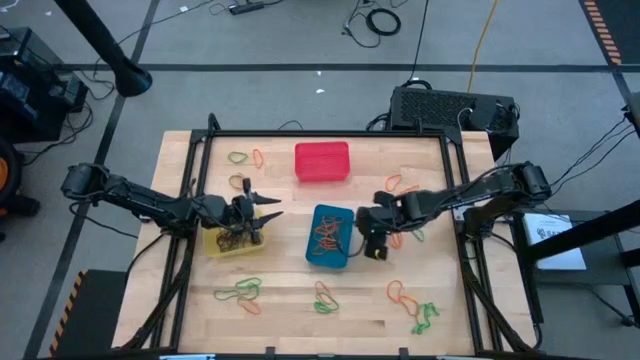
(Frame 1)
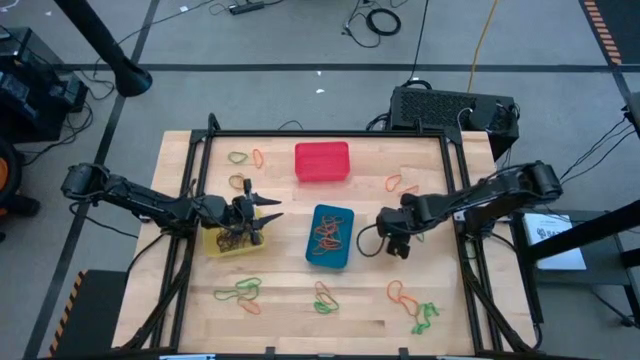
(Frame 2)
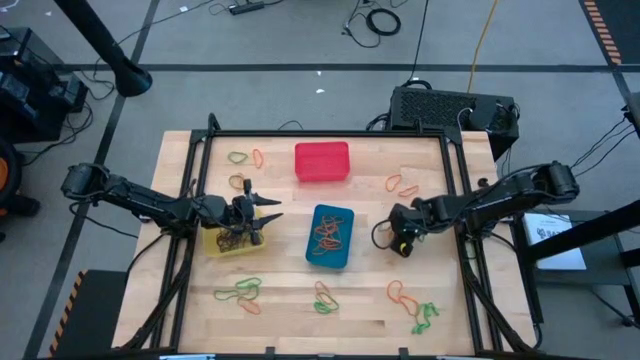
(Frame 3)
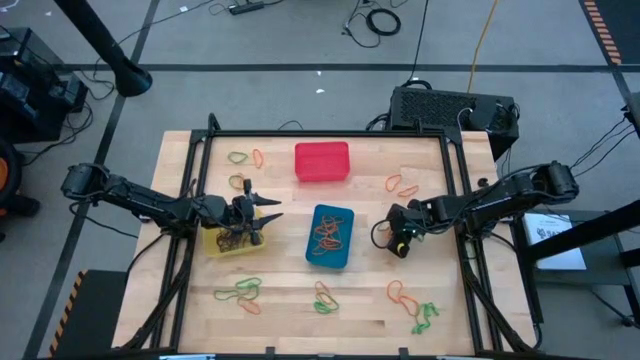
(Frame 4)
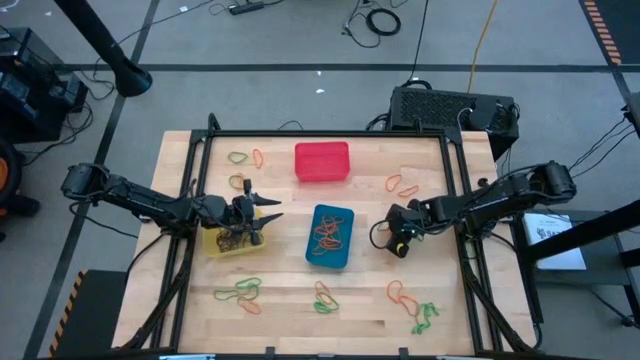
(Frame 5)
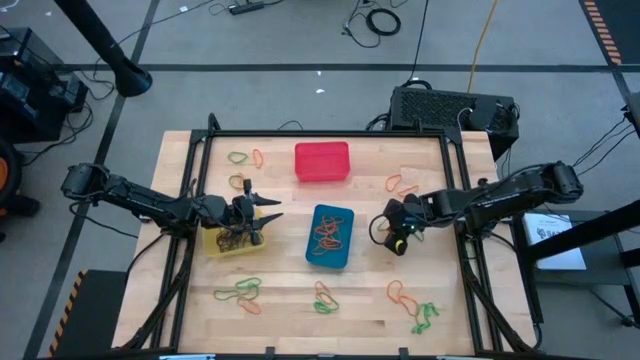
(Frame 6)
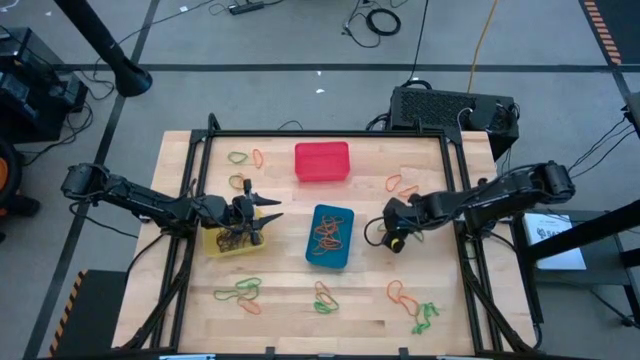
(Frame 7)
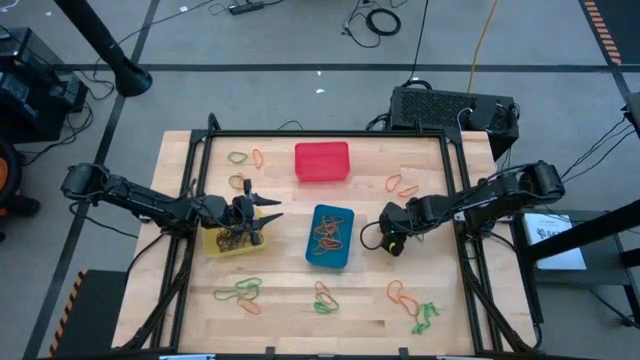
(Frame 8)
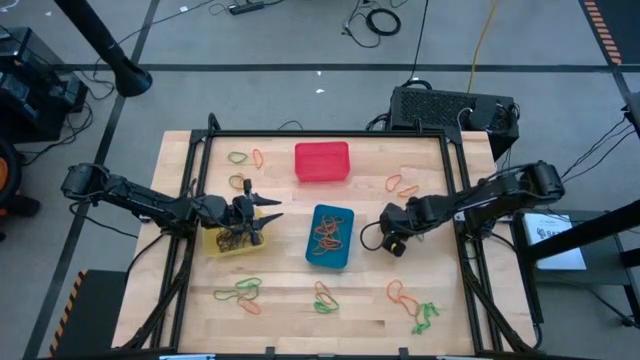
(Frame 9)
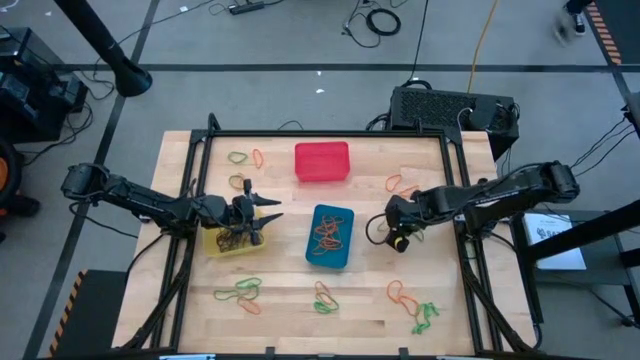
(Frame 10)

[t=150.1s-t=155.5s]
Task: Sort rubber bands into baskets
Put the orange rubber band into the blue bin

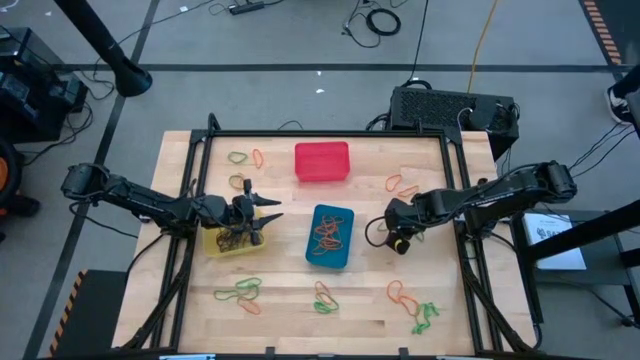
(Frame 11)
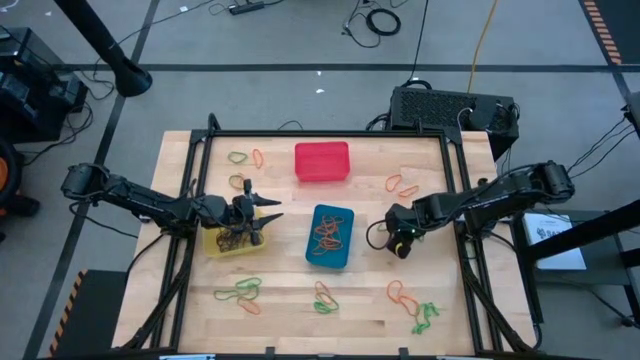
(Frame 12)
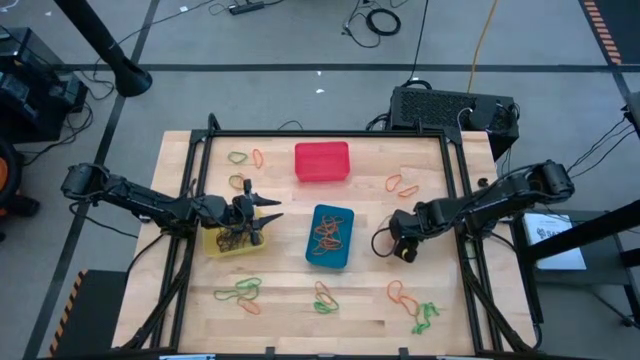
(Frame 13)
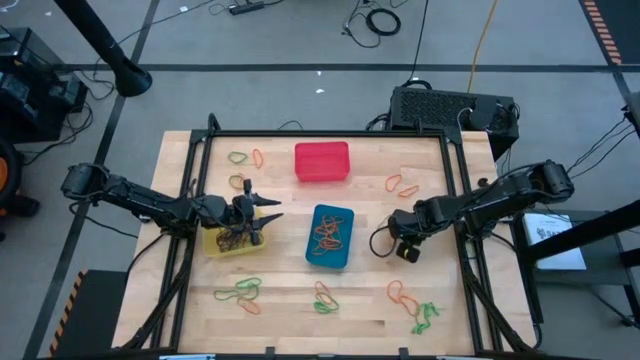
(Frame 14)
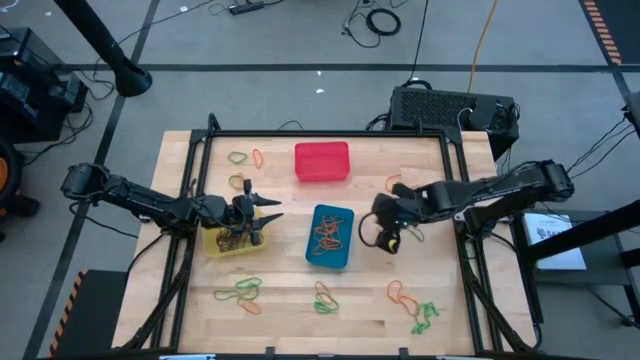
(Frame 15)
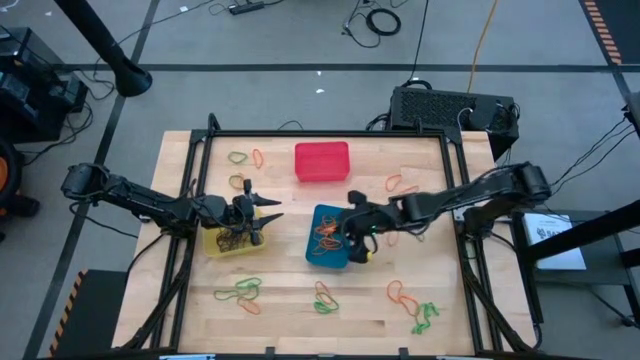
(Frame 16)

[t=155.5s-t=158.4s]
Put the orange rubber band into the blue bin

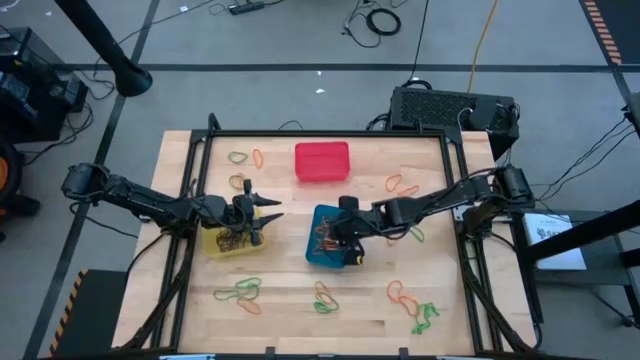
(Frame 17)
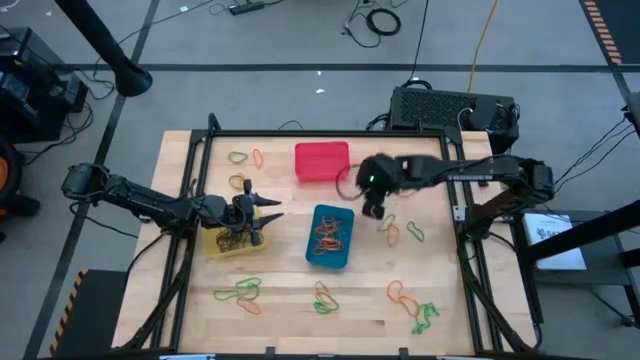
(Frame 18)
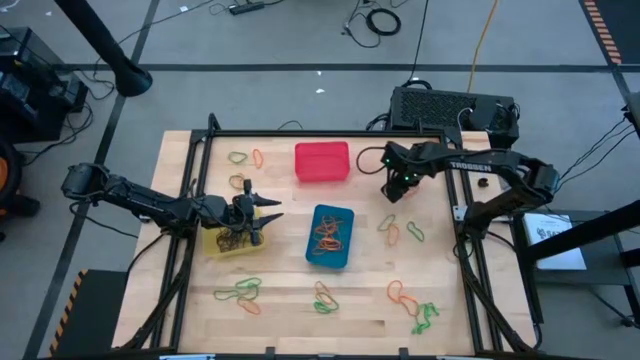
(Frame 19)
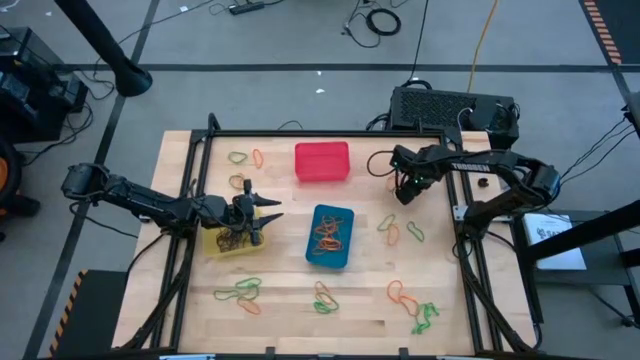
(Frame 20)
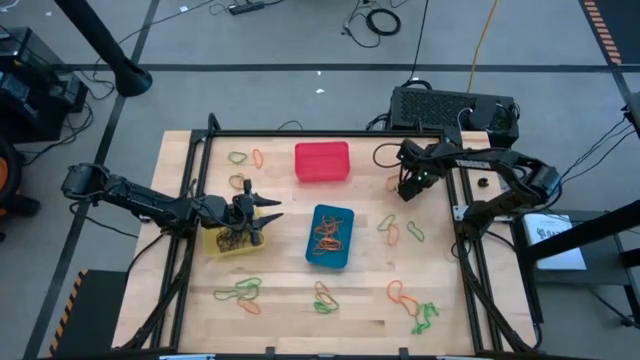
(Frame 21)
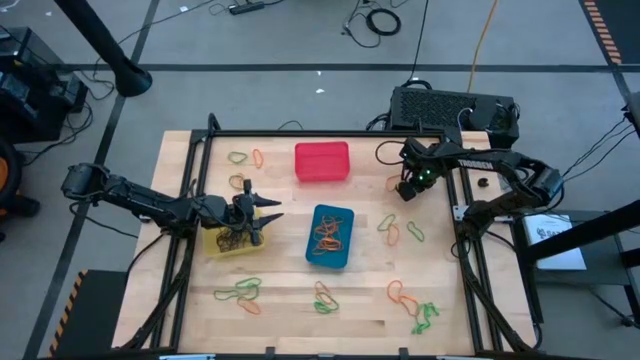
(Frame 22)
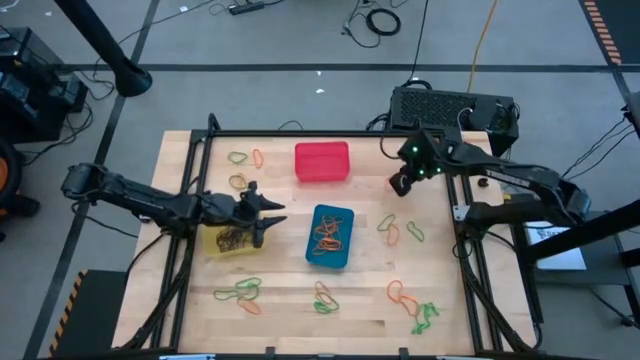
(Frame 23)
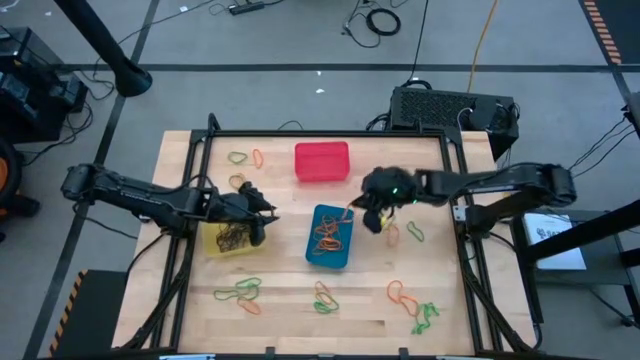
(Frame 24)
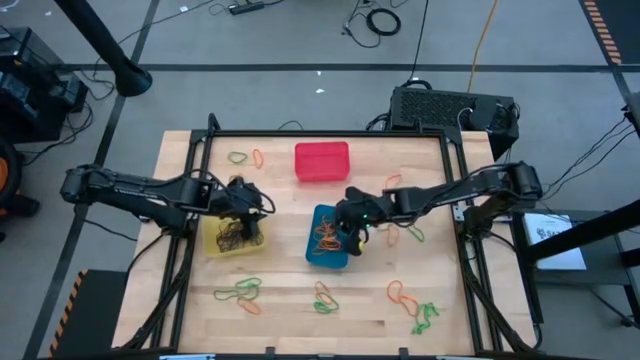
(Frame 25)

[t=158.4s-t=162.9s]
Put the orange rubber band into the blue bin

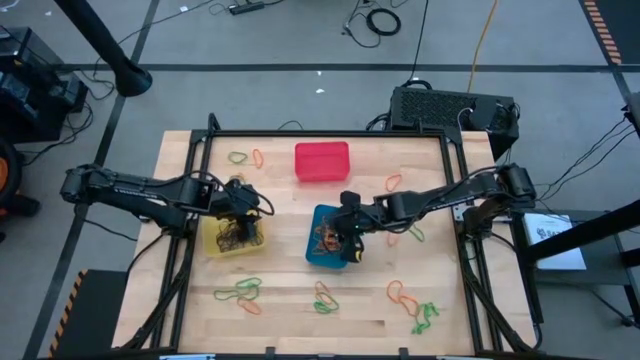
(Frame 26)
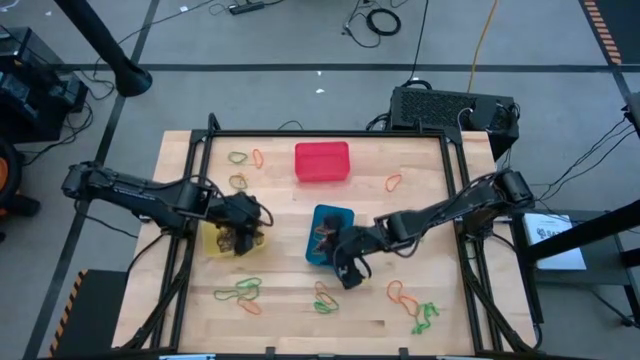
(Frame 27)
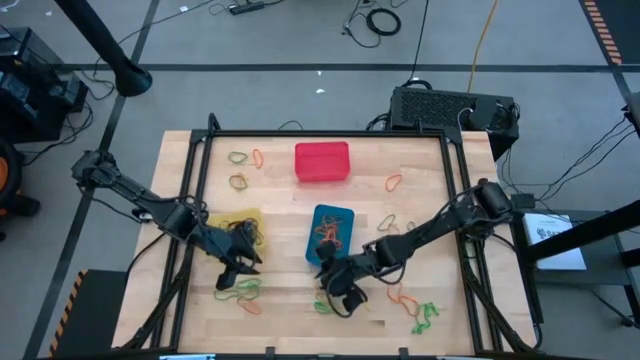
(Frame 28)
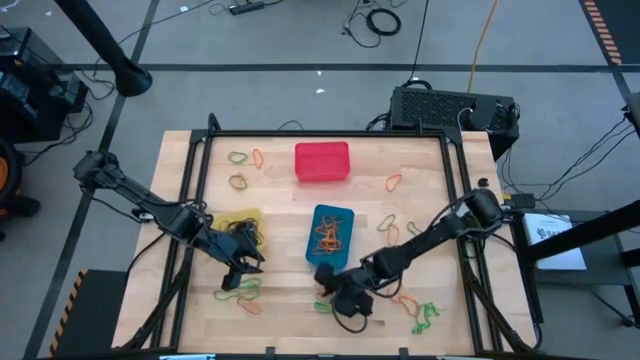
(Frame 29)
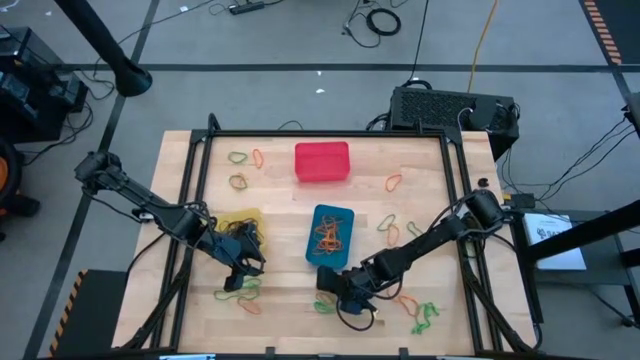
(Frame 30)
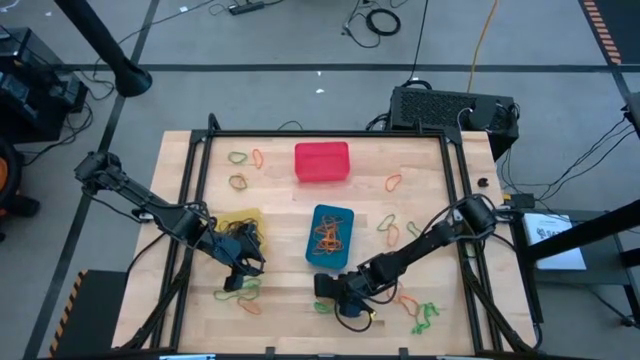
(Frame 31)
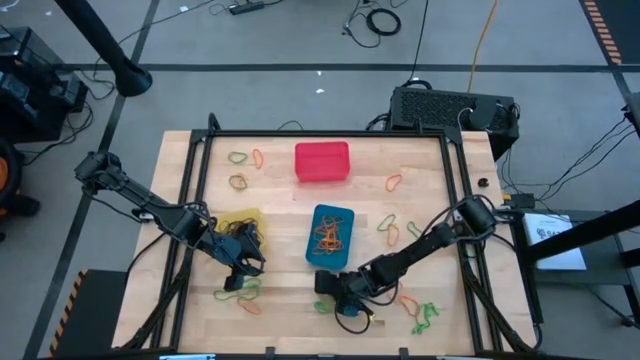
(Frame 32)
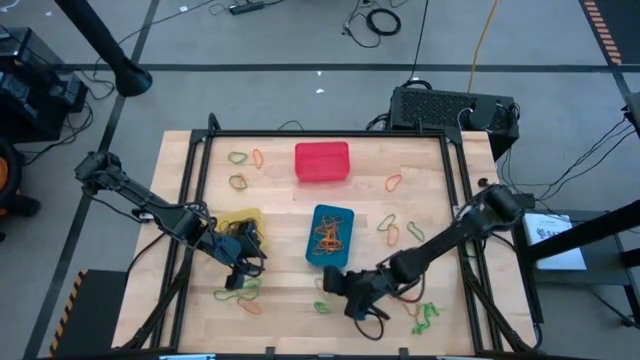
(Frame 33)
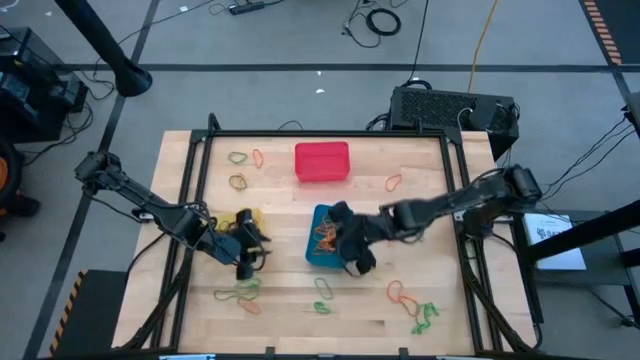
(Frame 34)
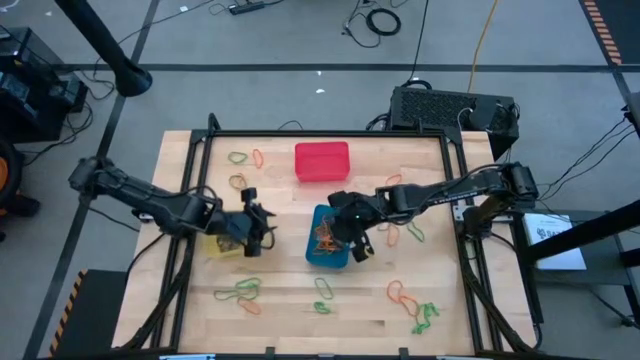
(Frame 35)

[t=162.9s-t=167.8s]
Put the orange rubber band into the blue bin

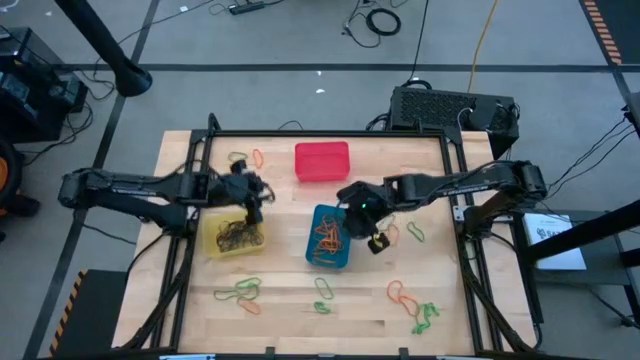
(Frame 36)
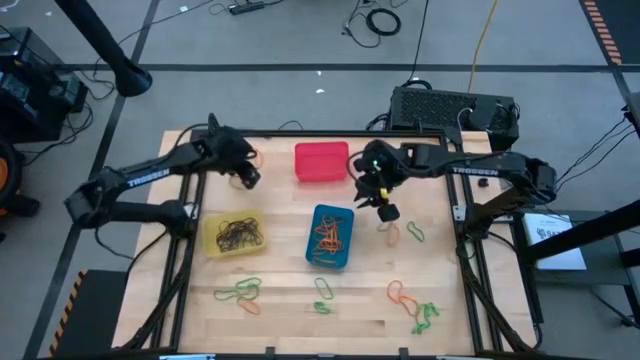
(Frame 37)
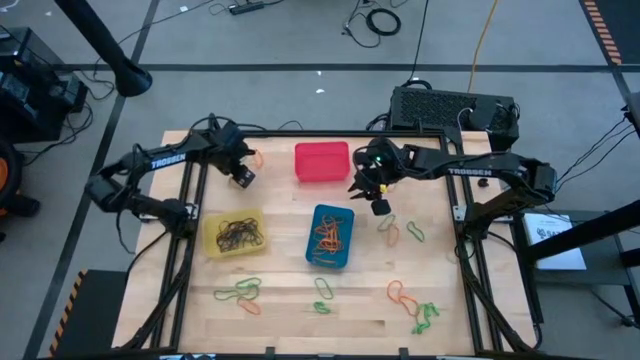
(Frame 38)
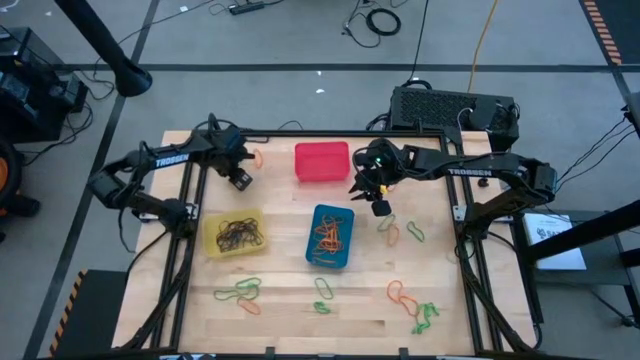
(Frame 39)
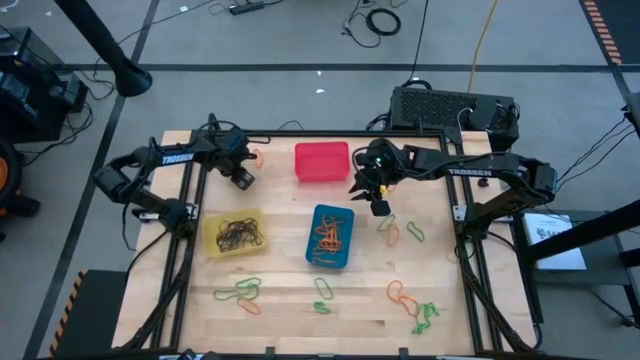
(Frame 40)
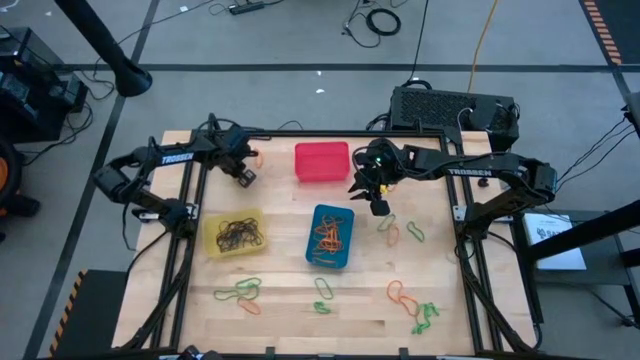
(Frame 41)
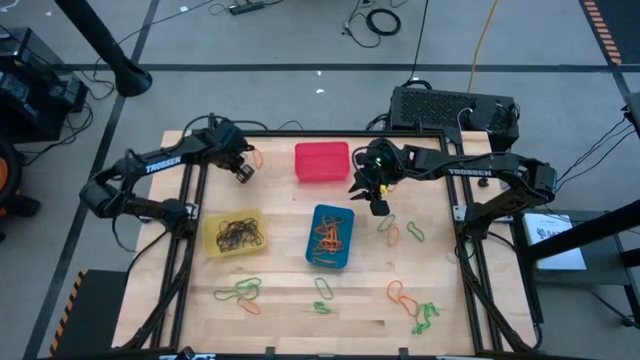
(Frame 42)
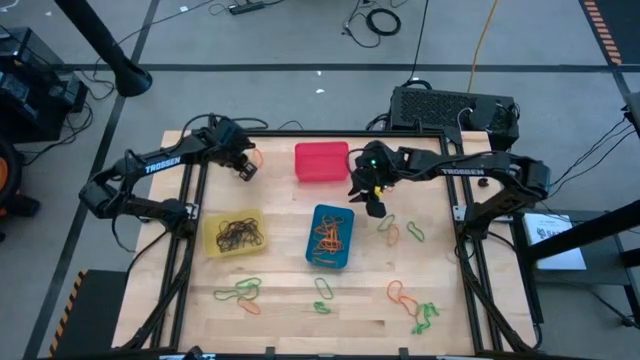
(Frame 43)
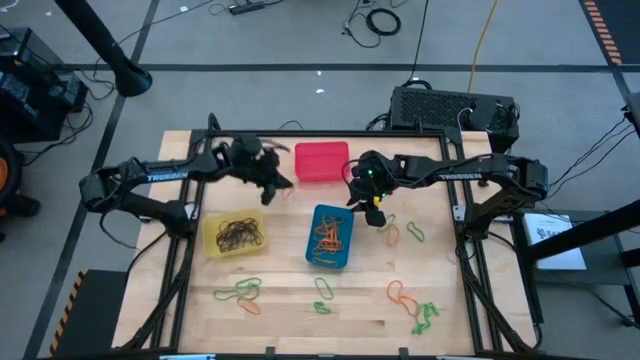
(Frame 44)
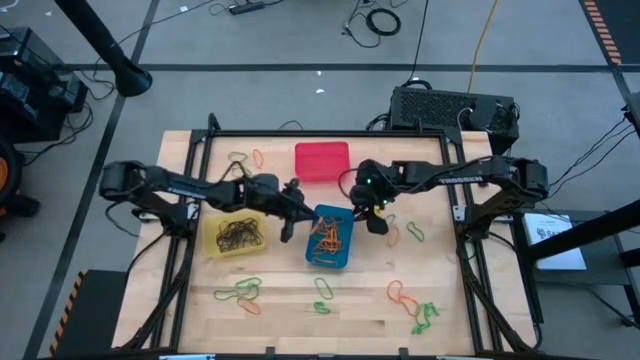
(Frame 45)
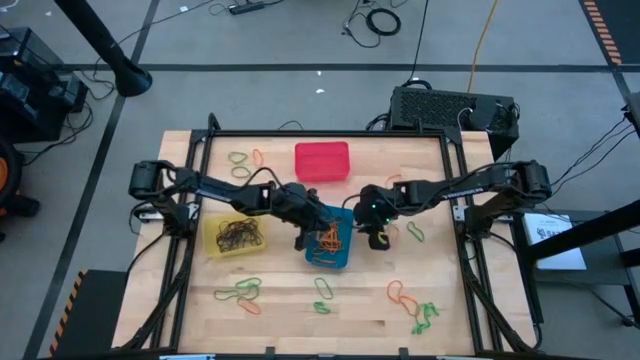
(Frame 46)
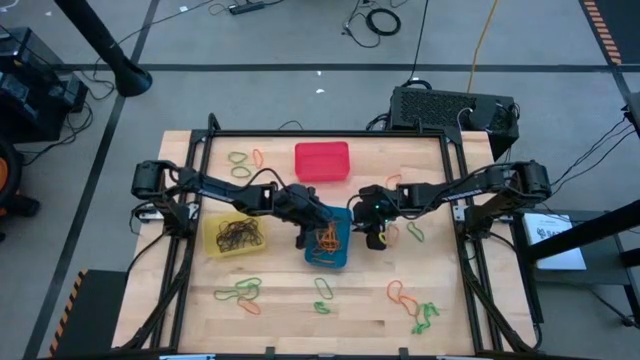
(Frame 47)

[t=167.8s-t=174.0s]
Put the orange rubber band into the blue bin
